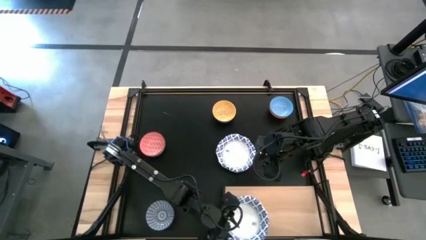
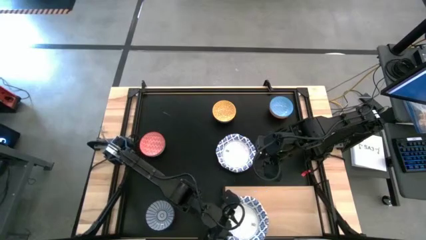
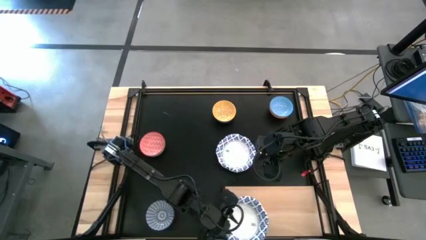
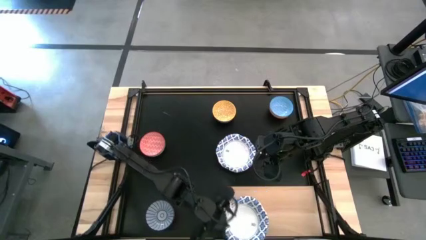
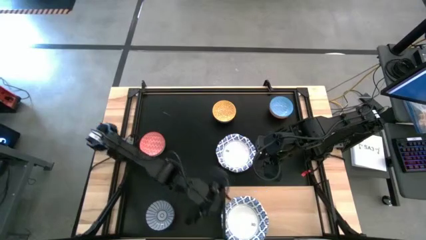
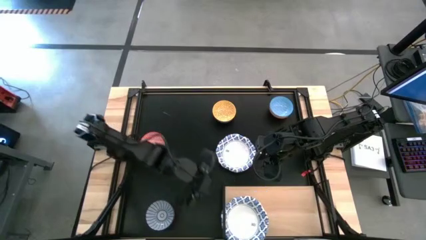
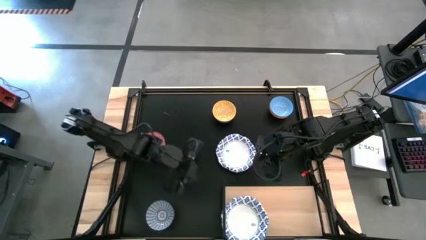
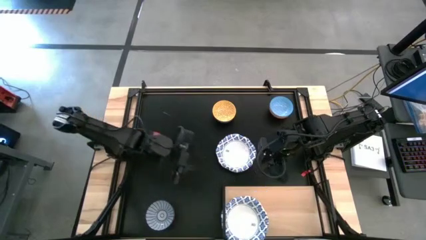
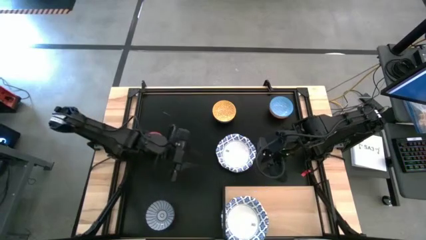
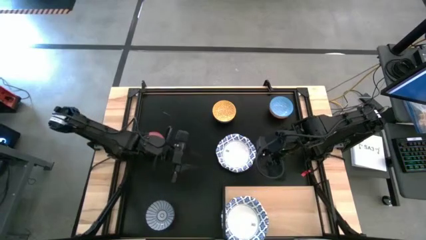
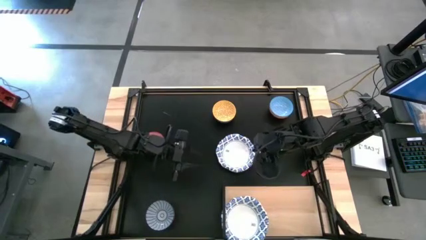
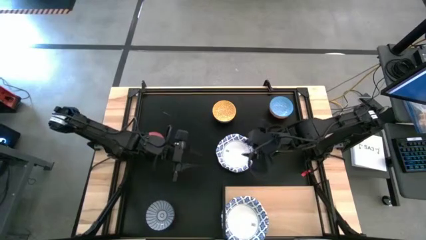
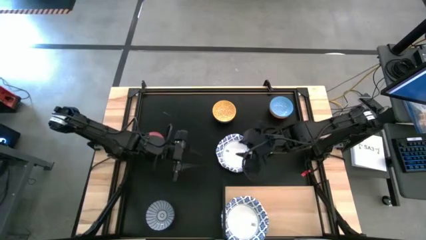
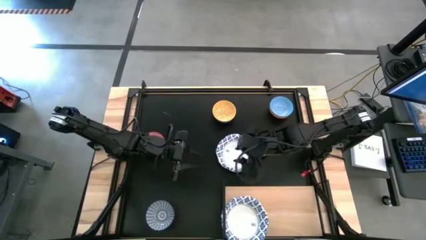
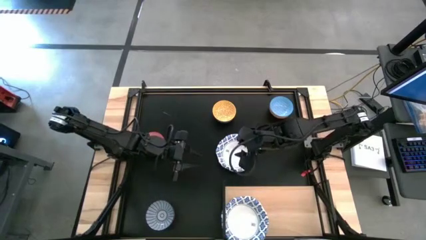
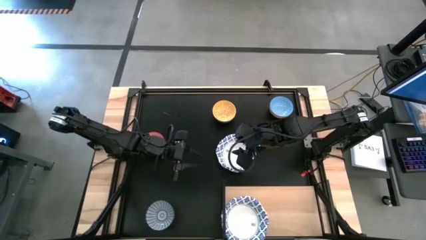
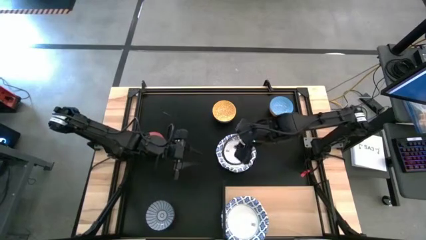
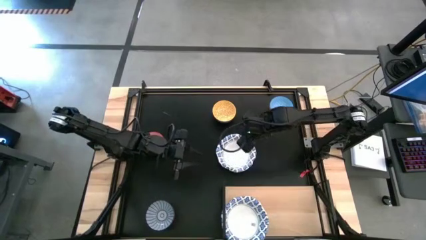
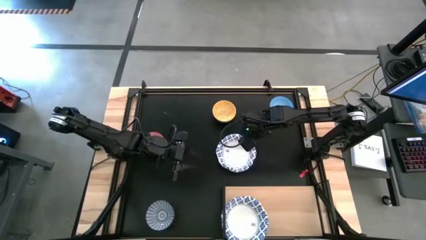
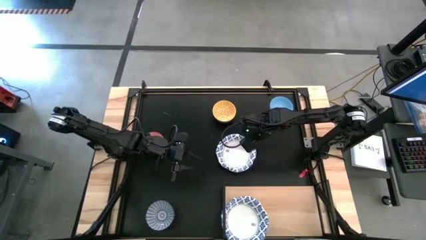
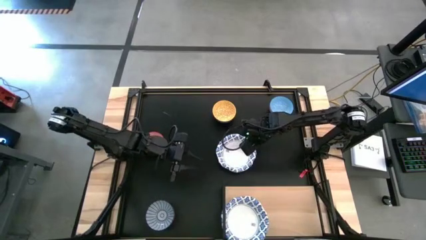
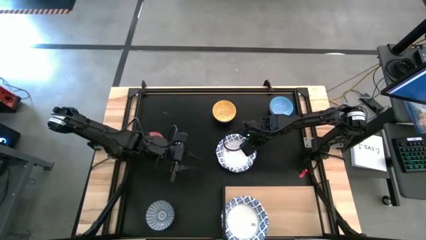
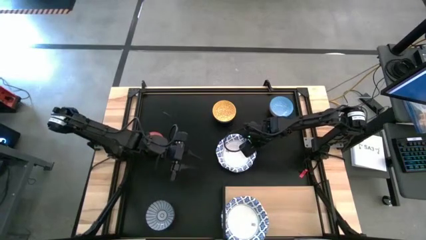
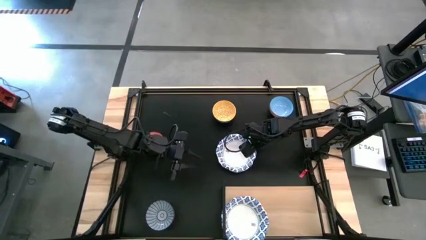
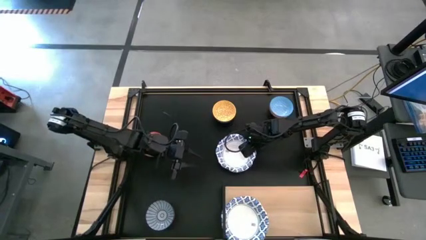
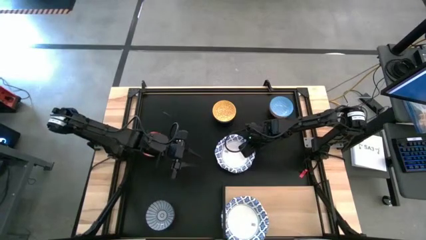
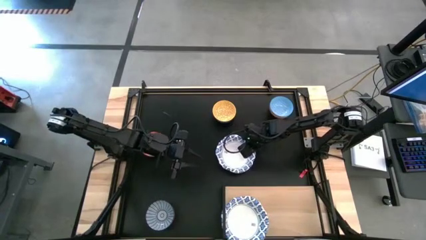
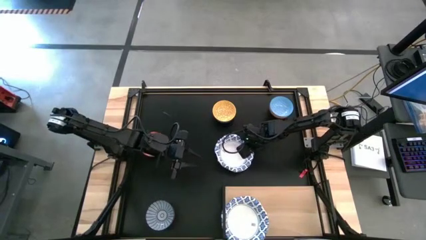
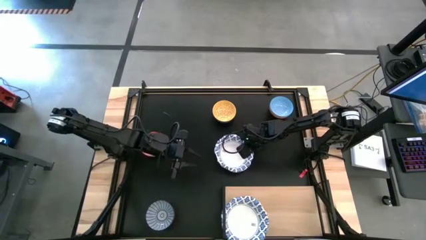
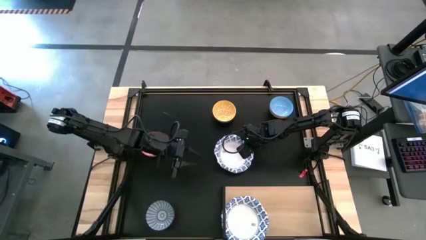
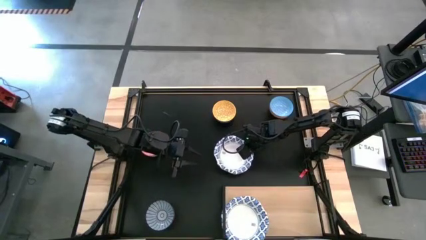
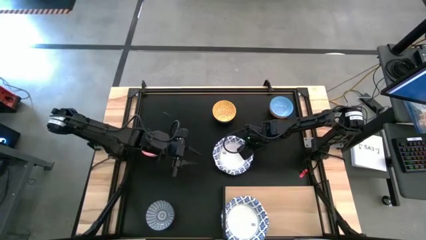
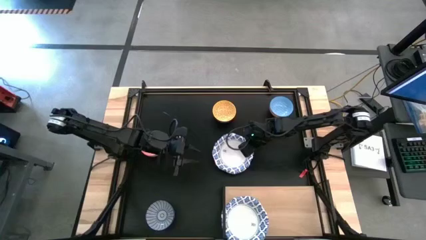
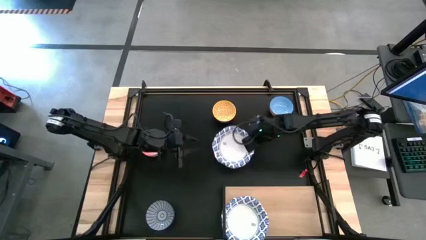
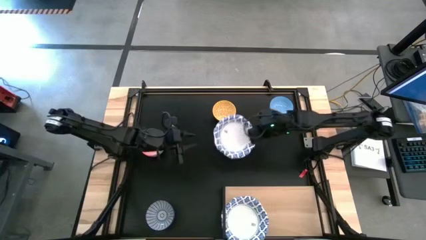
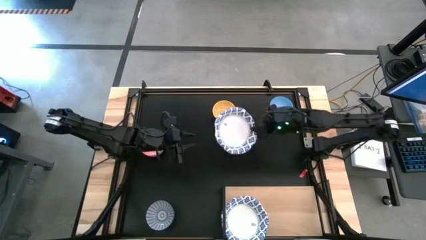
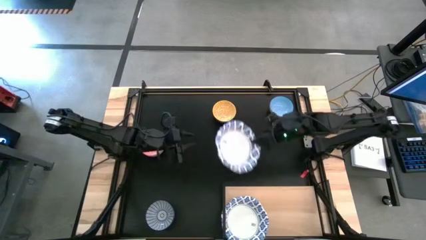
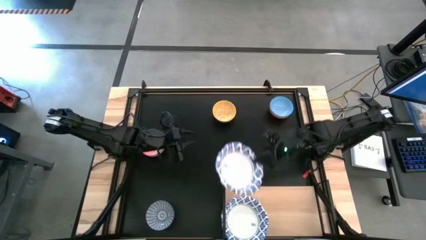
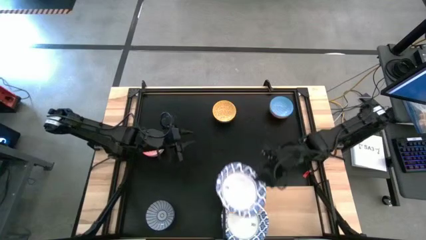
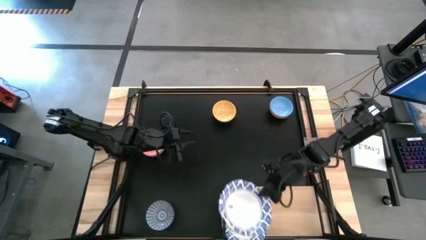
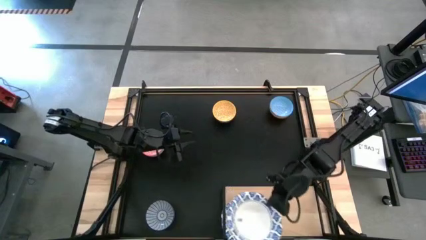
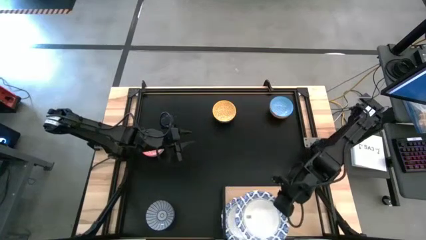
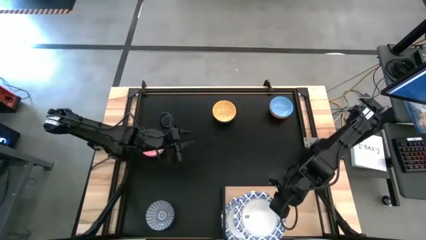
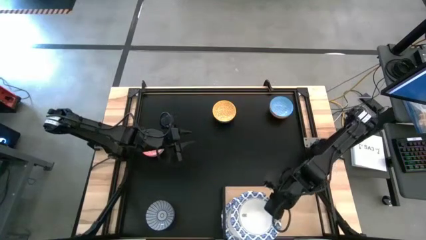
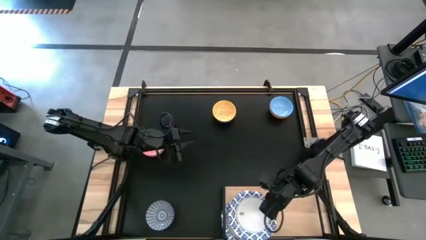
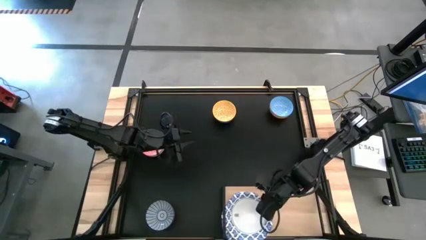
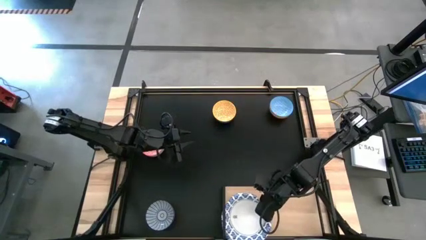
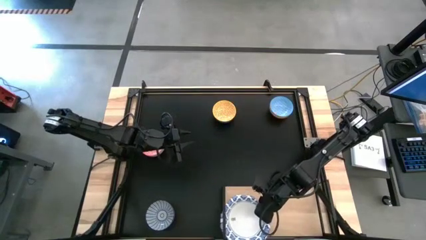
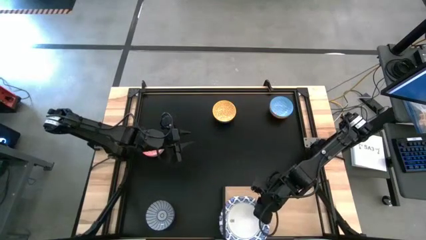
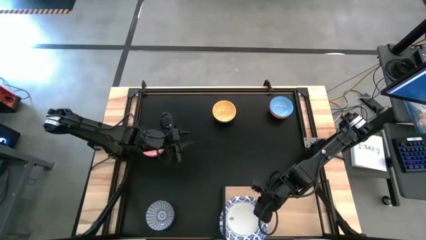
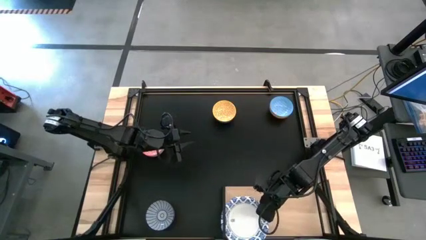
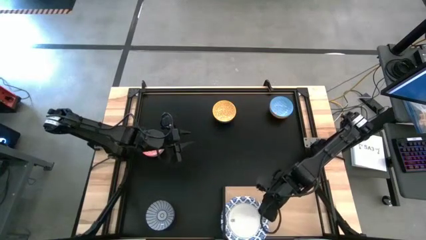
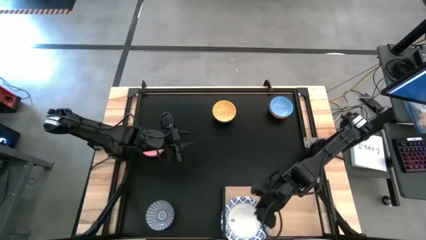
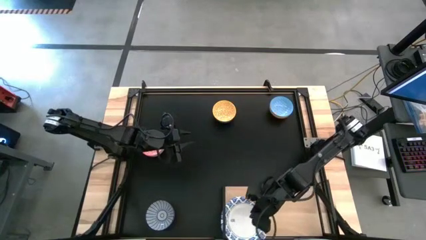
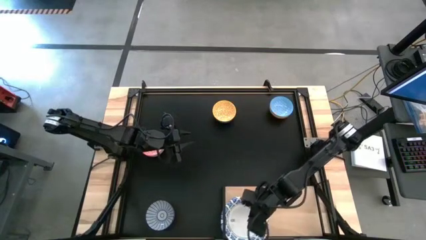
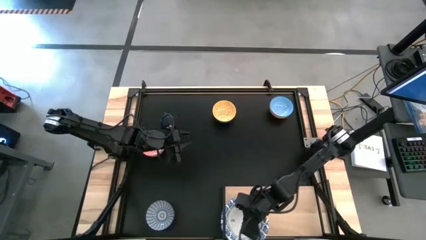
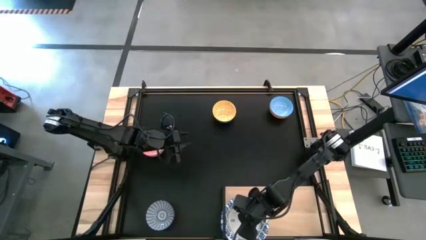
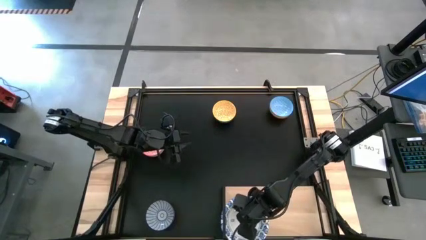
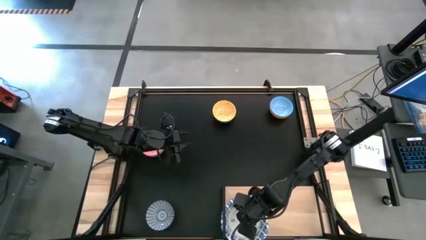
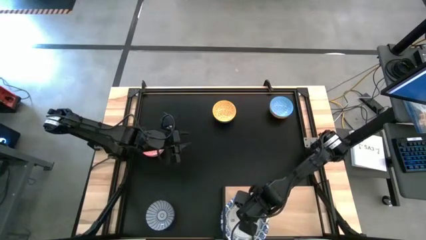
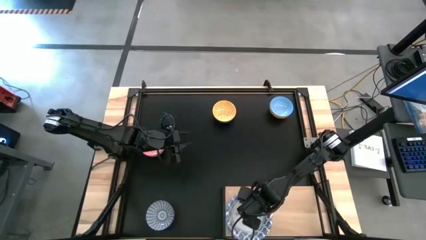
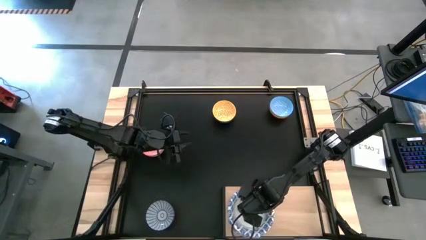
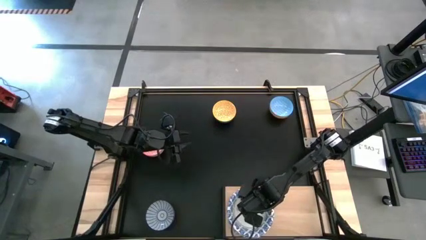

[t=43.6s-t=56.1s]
Task: Place and stack bowls onto a shelf
Stack the white patterned bowl on top of the other white patterned bowl on the shelf

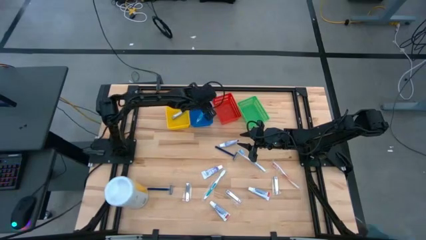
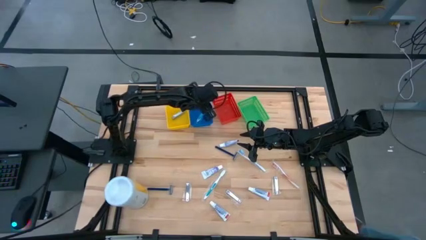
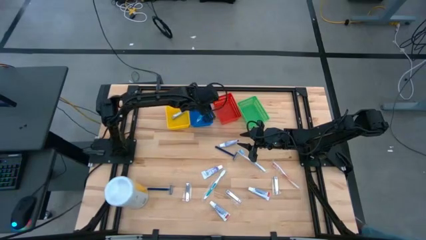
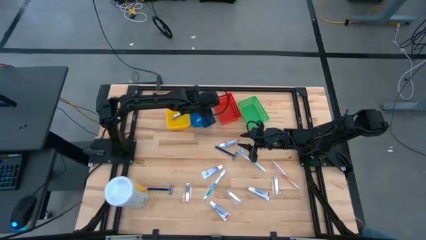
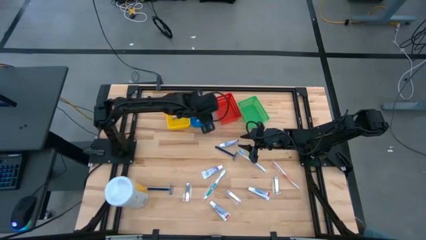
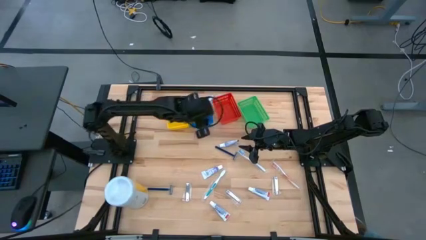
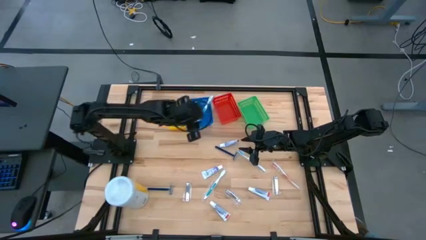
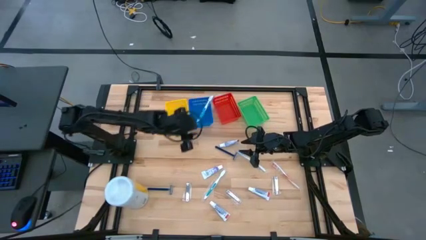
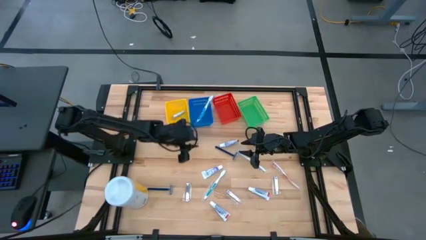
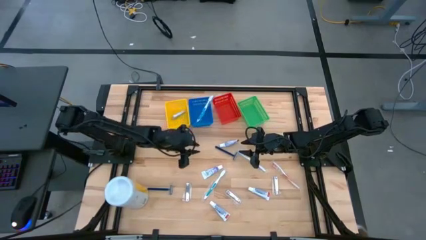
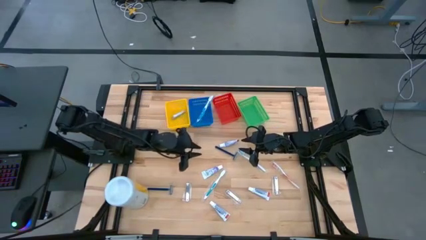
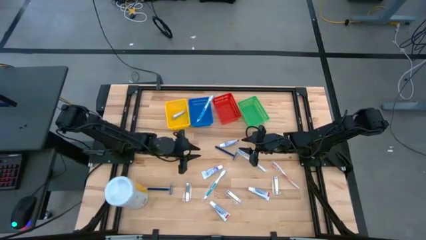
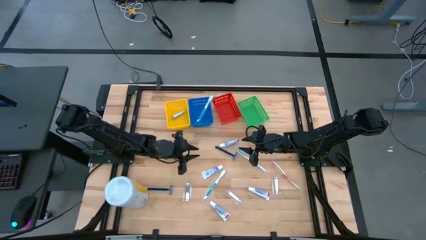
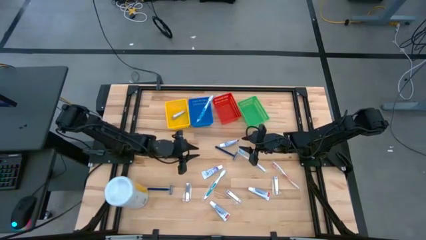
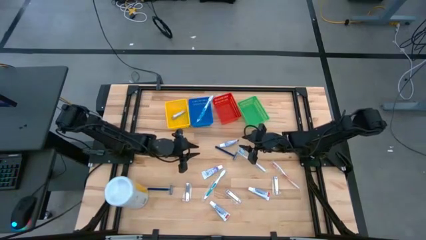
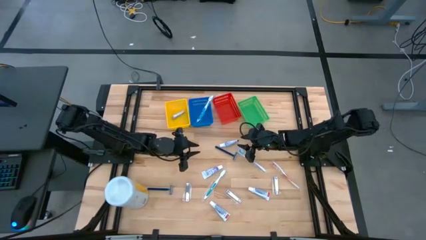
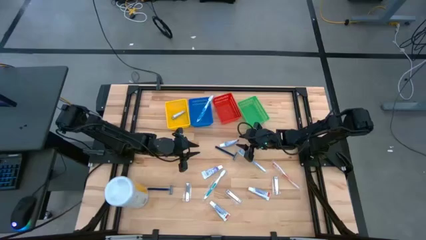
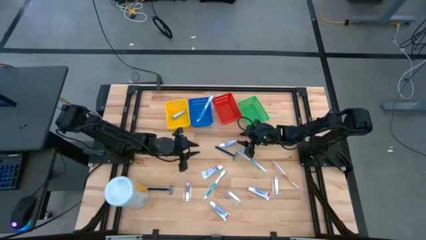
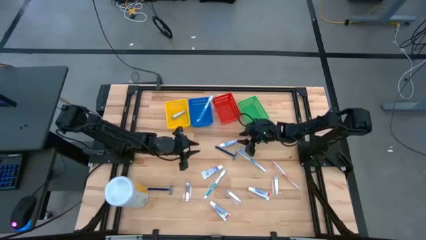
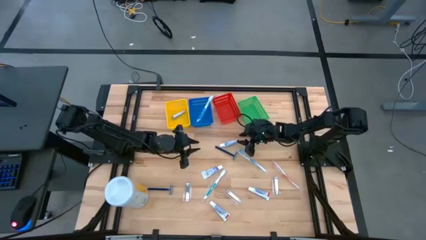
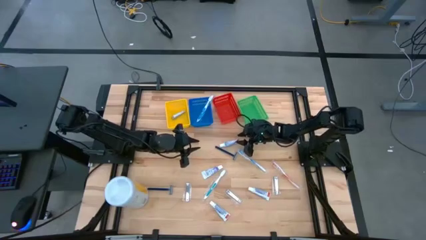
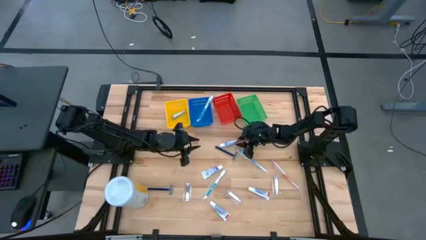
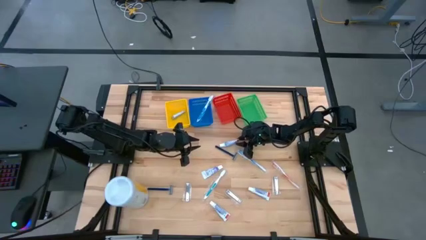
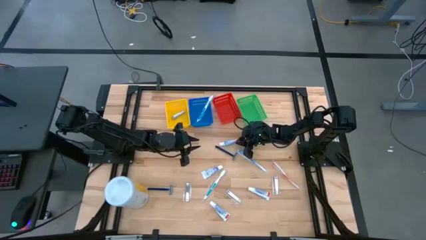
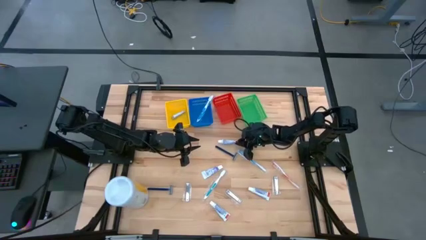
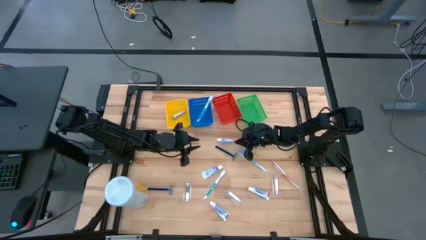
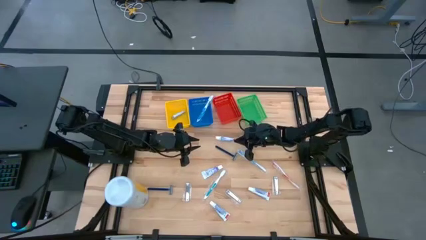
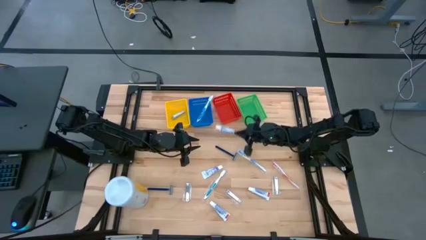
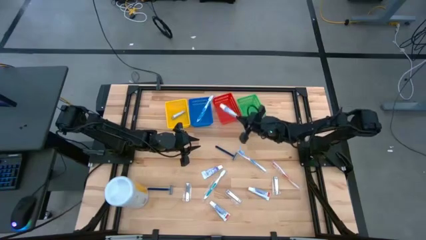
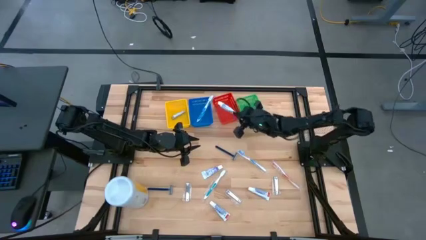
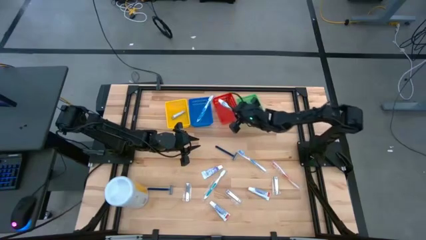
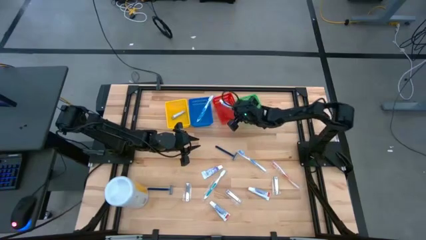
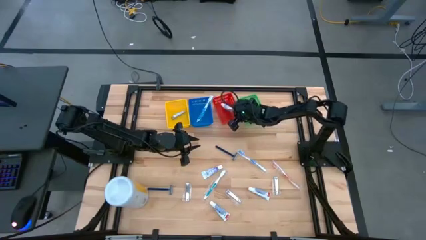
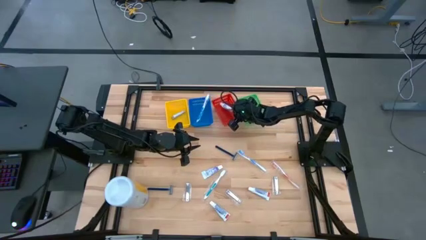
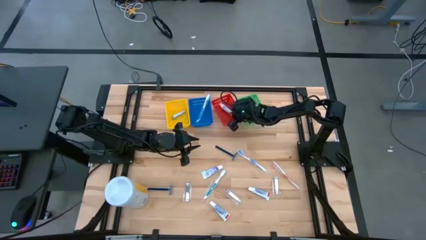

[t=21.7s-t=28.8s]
Task: Pick & Place Travel size toiletries
Put the top toothpaste into the red bin
